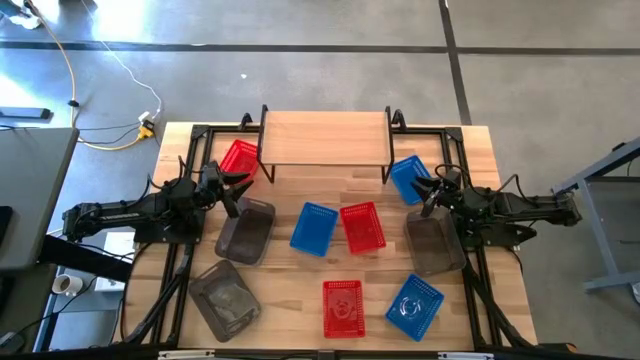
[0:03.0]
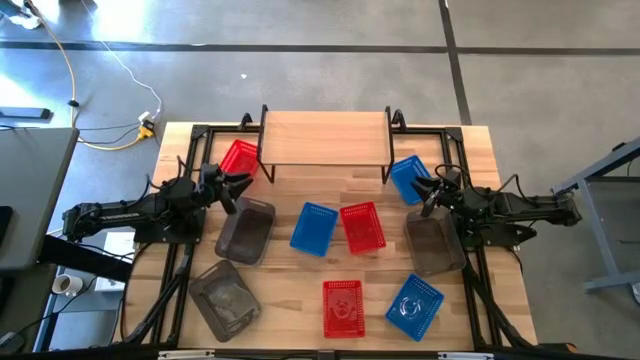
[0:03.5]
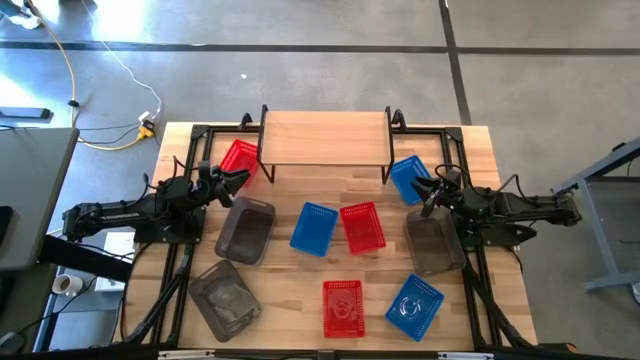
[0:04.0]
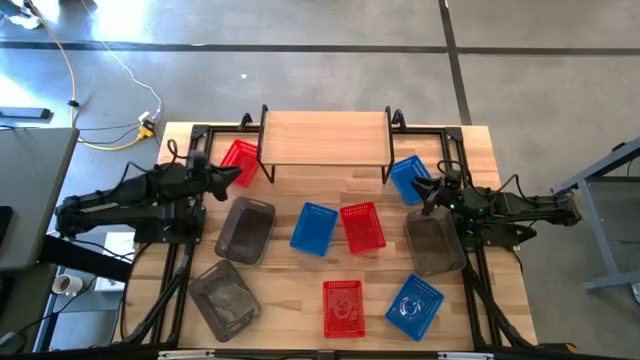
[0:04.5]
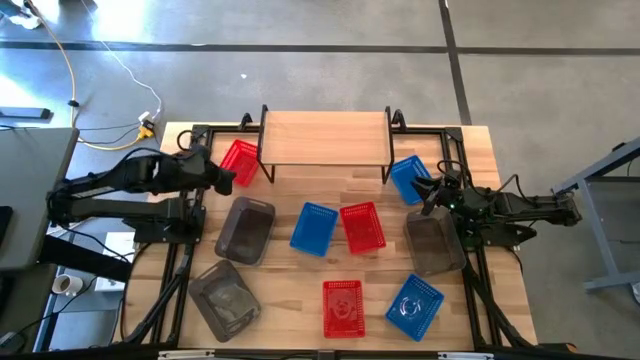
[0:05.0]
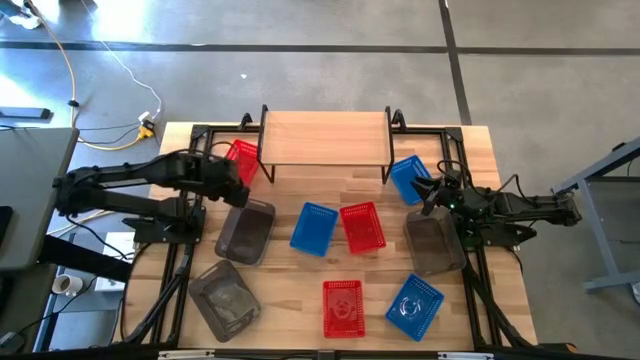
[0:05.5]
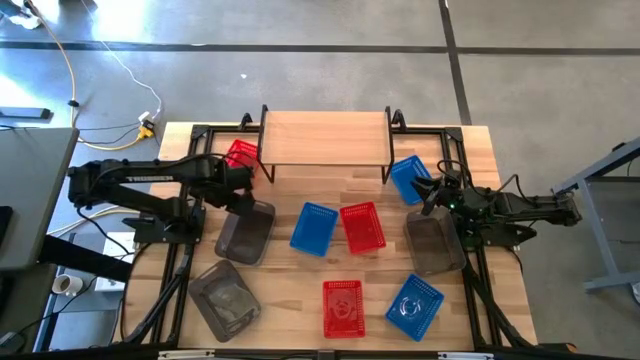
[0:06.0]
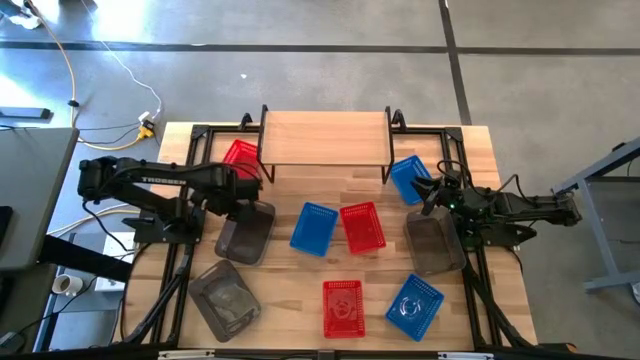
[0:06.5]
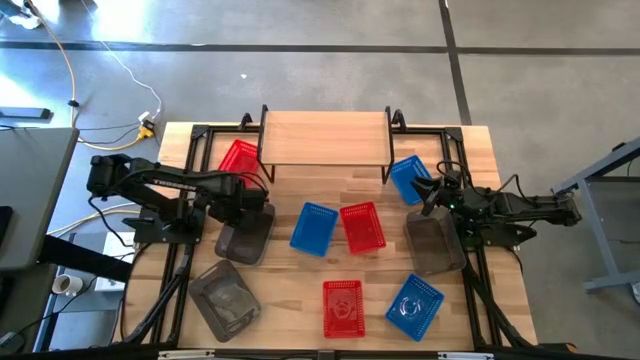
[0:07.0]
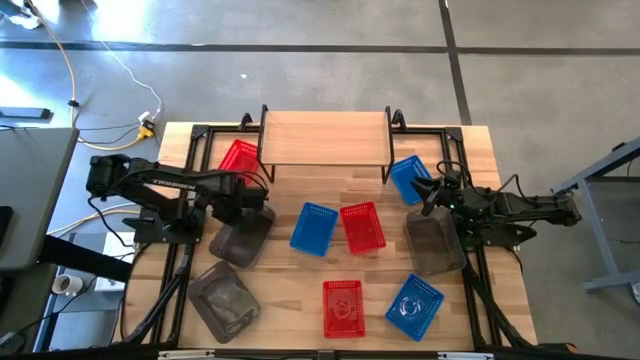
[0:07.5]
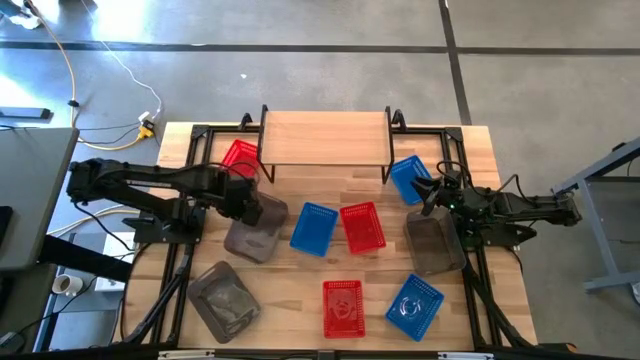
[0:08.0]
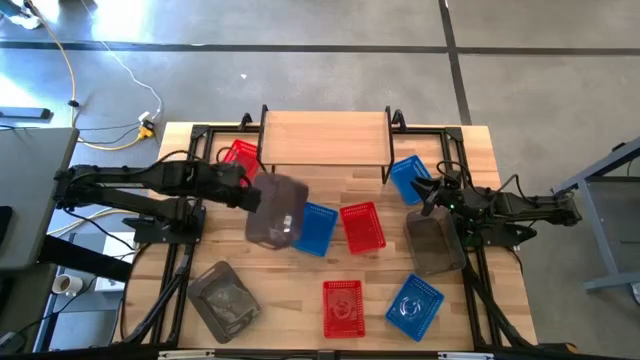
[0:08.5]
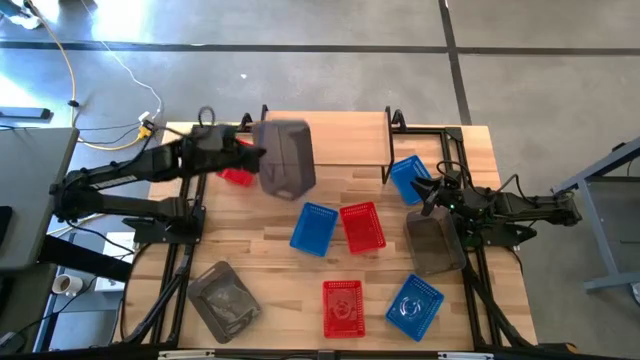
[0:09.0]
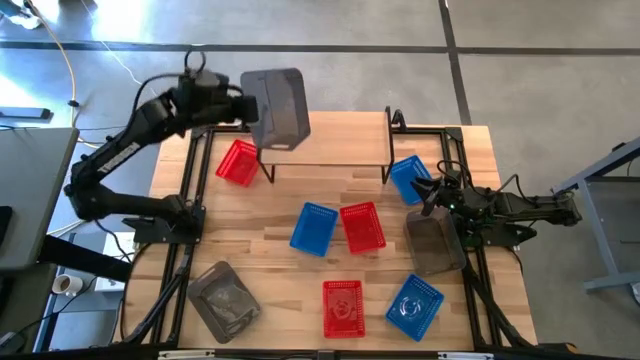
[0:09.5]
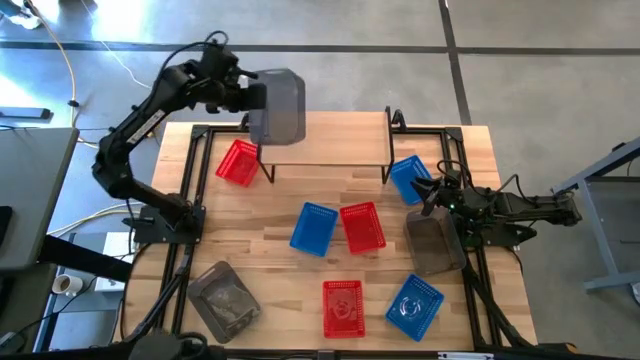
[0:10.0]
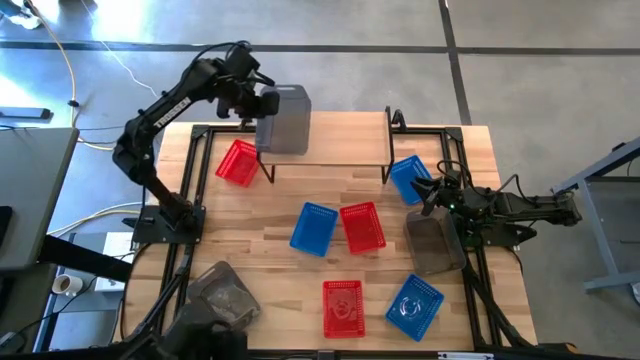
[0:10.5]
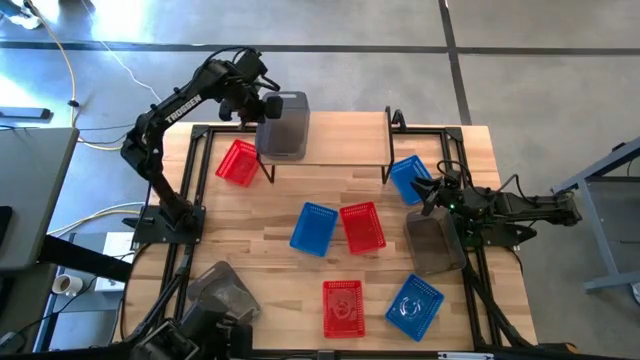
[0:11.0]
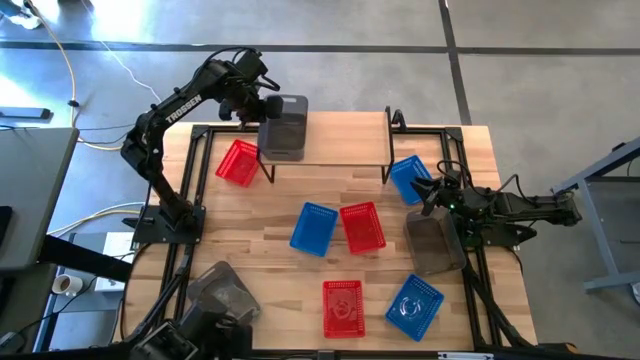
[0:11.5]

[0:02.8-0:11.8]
Task: Stack baskets on shelf by color
Put the top left black bin on the shelf

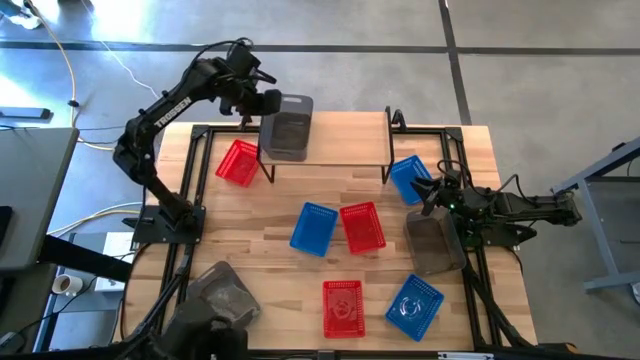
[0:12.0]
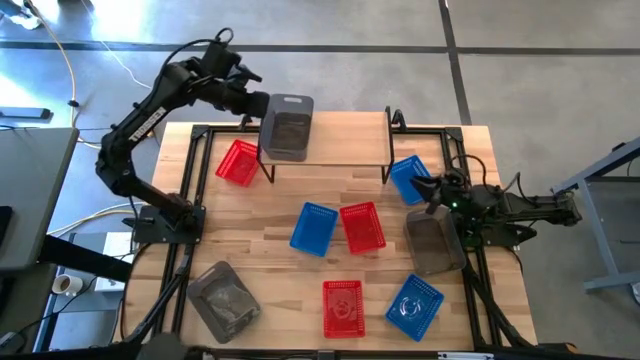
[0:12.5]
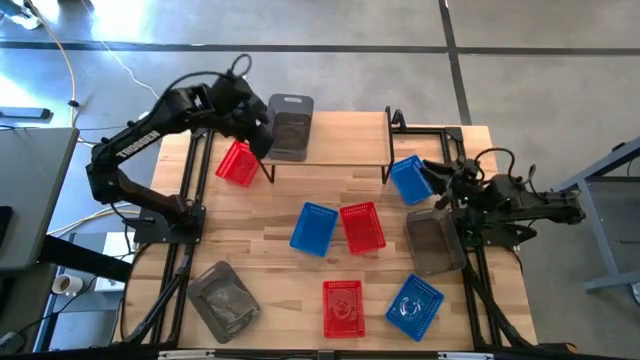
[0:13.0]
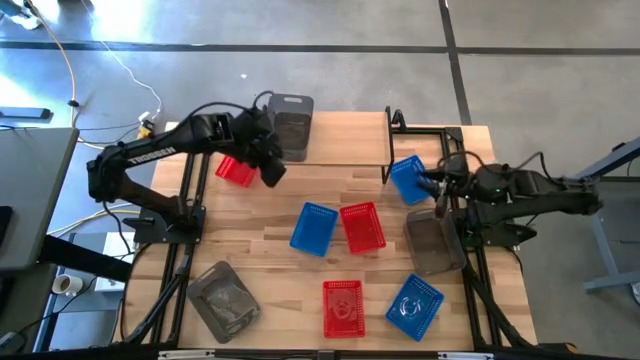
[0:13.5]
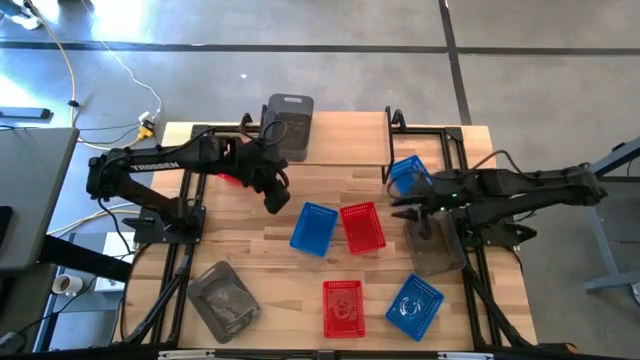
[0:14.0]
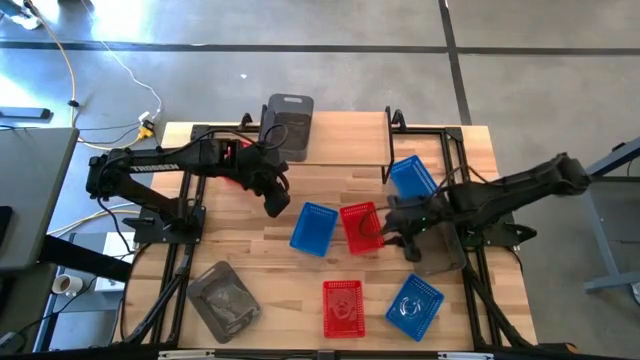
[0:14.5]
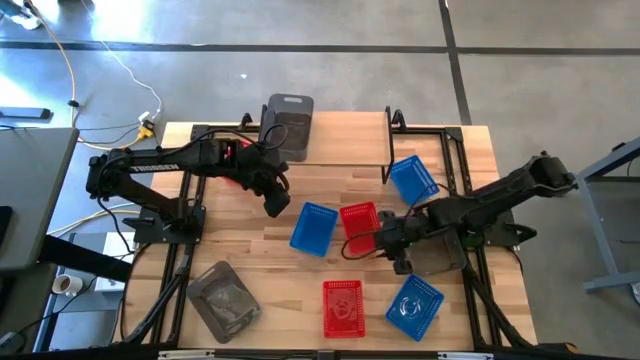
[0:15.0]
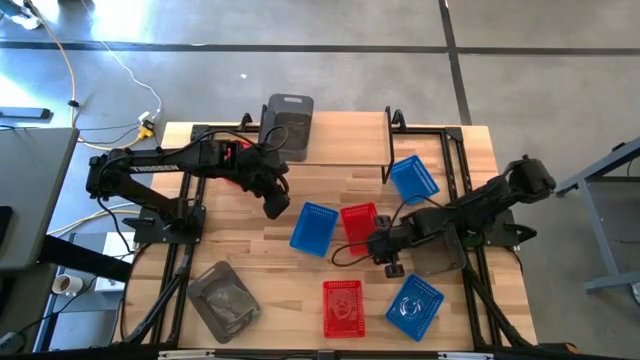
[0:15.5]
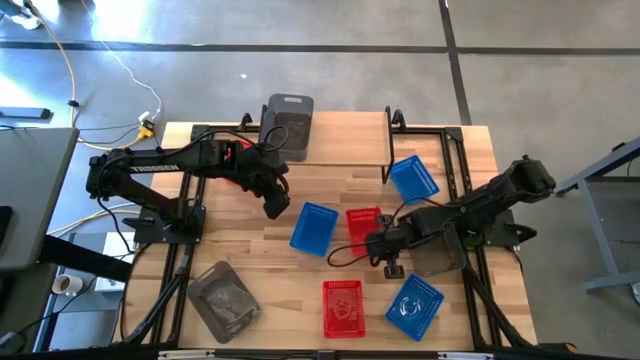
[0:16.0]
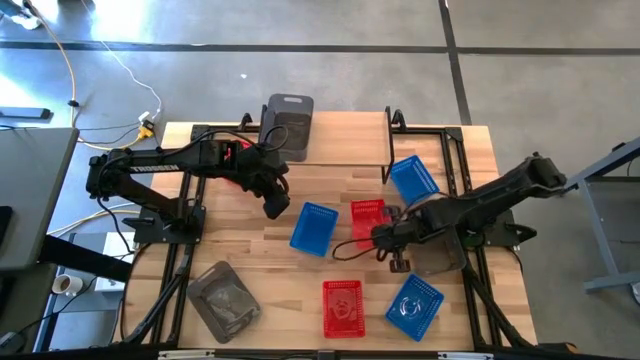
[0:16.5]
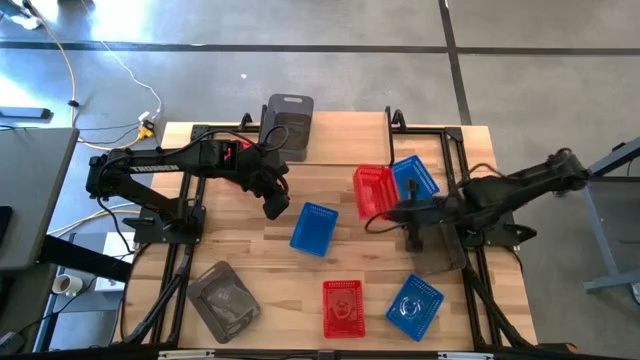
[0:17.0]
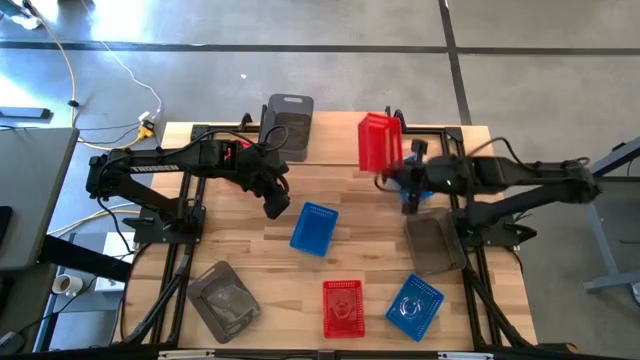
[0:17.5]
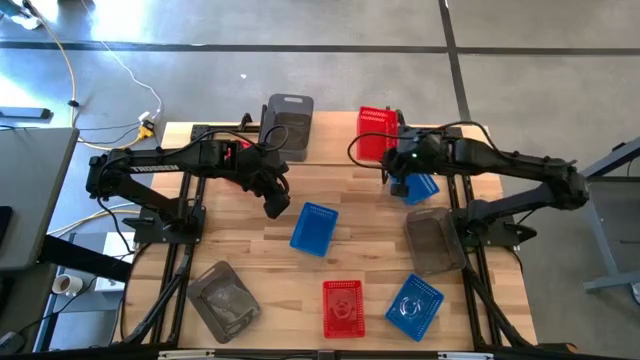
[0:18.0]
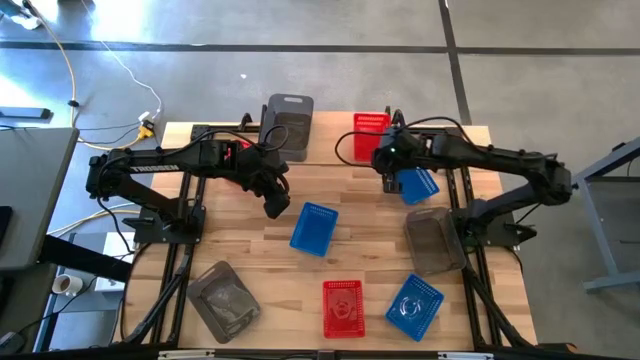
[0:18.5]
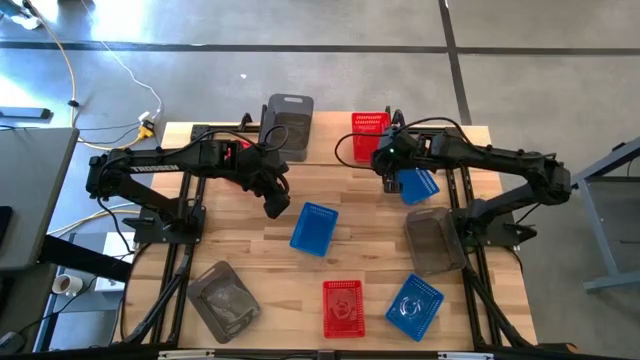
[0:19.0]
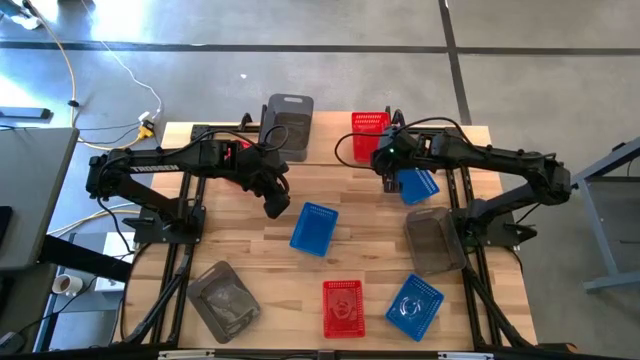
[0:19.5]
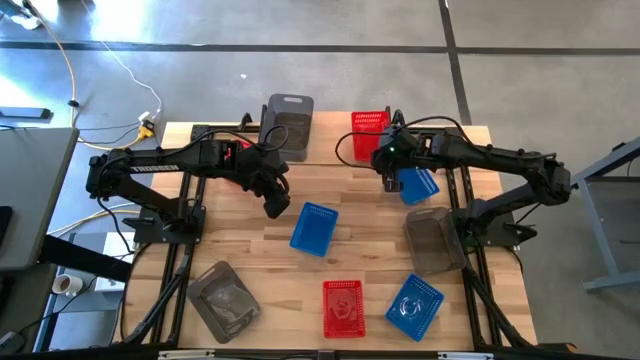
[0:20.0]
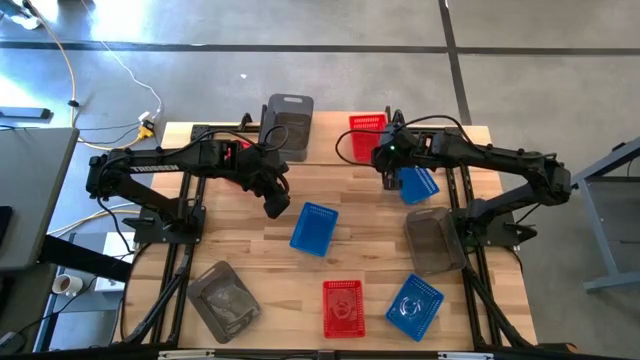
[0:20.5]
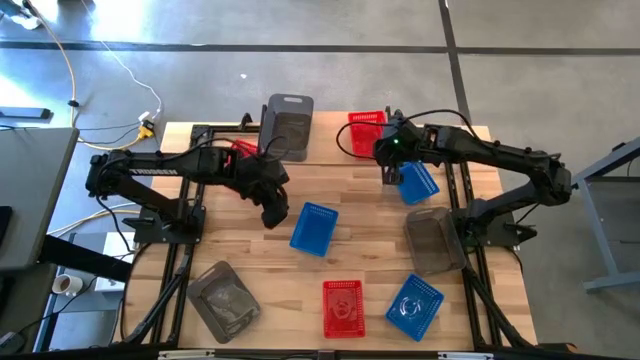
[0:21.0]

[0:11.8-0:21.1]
Put the middle red bin on the shelf

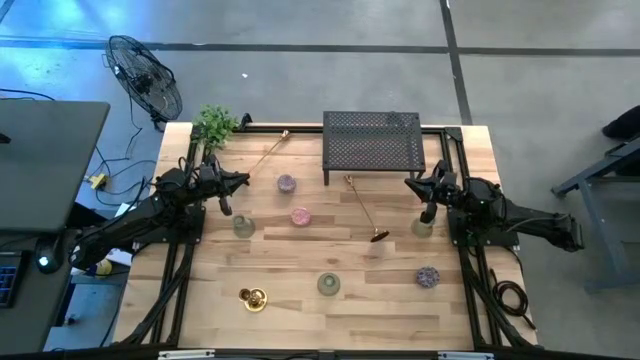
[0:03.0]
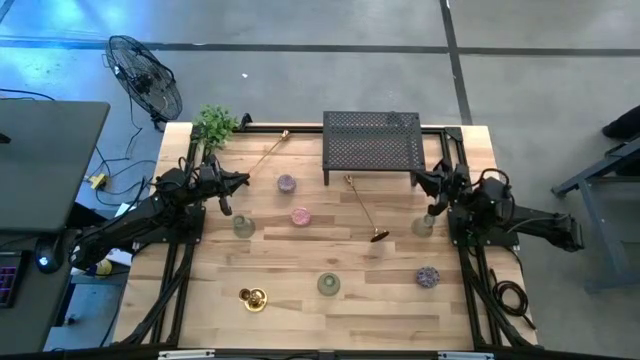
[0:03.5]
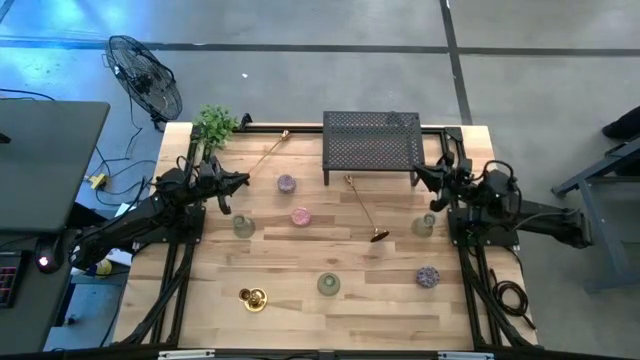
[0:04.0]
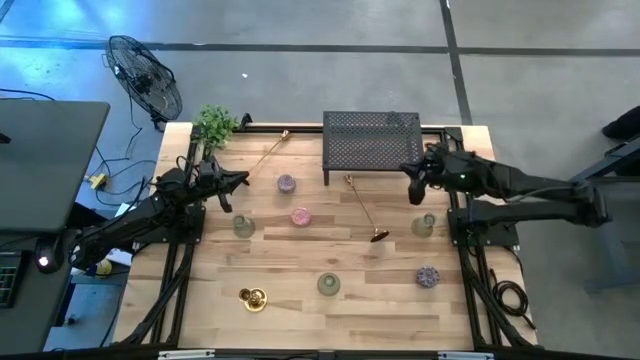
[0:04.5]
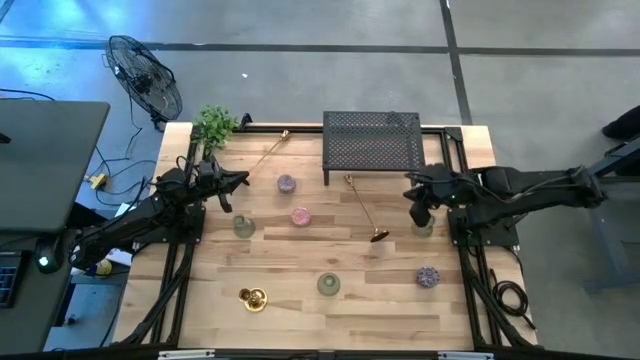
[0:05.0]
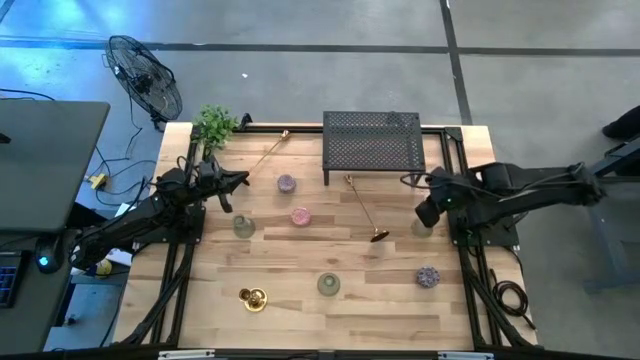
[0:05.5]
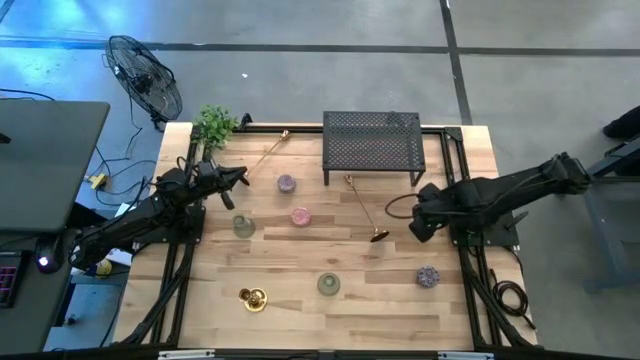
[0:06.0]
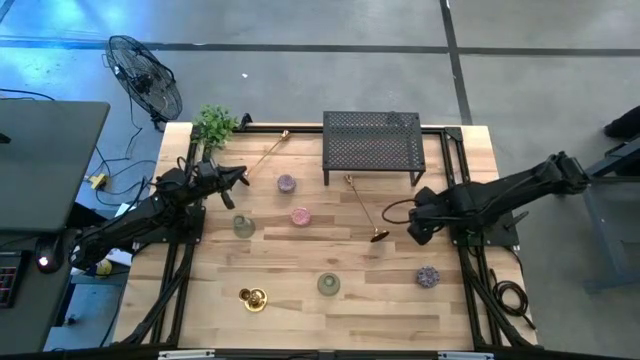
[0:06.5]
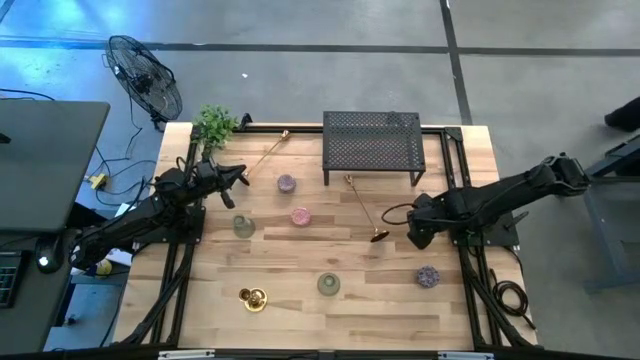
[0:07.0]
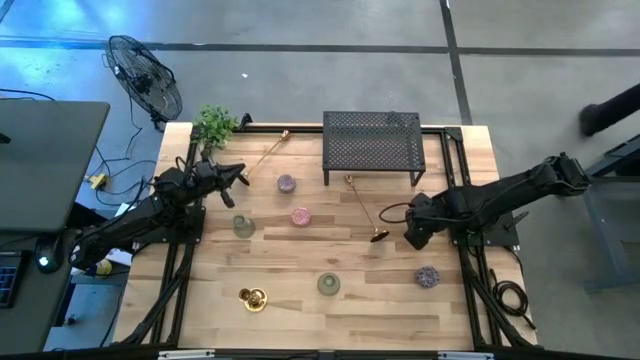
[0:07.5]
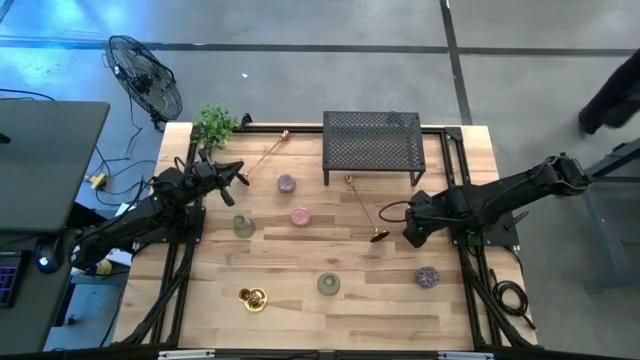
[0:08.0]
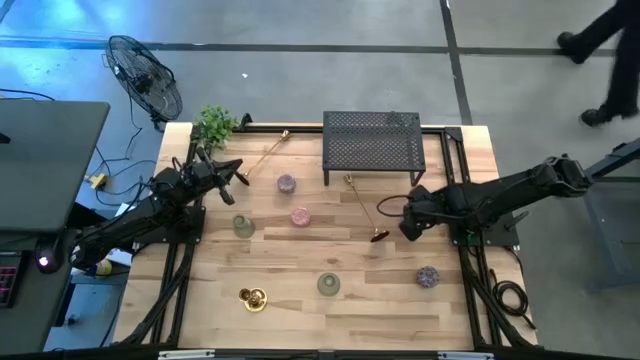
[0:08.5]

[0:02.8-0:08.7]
Task: Pick & Place candle stick holders
Put the top right transparent candle holder on the shelf
